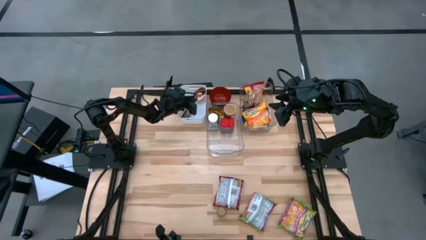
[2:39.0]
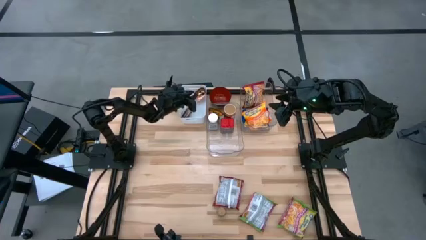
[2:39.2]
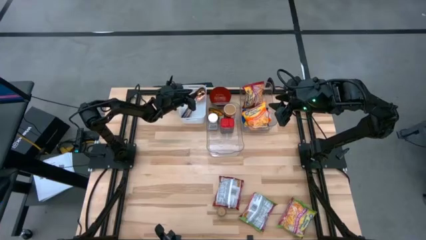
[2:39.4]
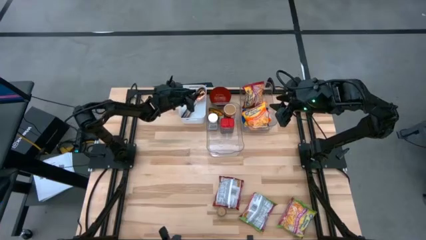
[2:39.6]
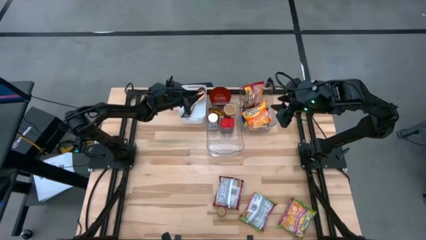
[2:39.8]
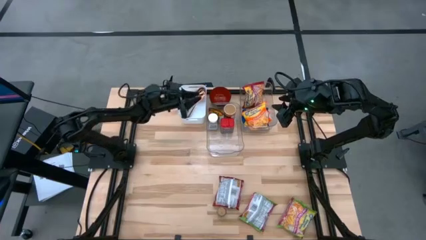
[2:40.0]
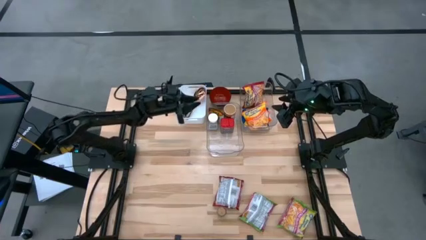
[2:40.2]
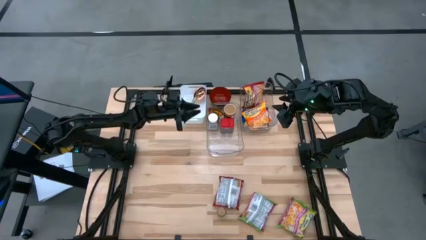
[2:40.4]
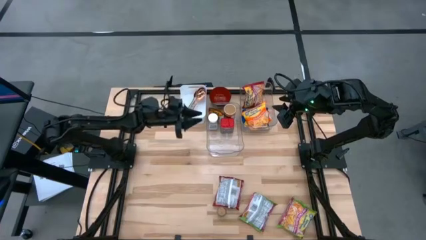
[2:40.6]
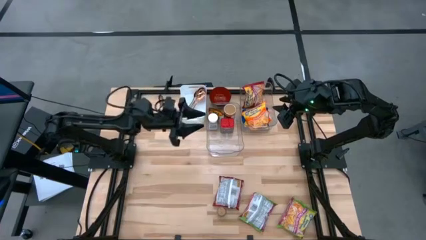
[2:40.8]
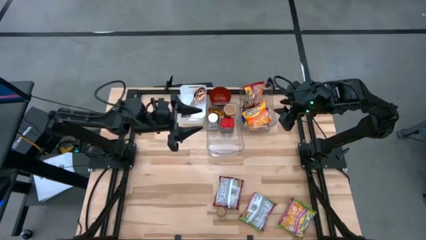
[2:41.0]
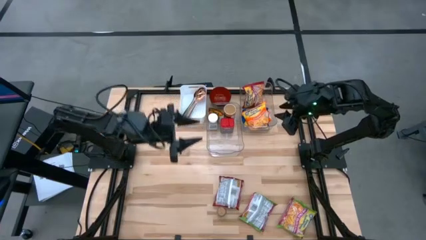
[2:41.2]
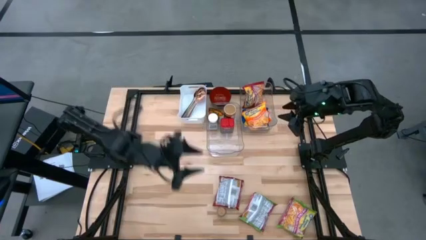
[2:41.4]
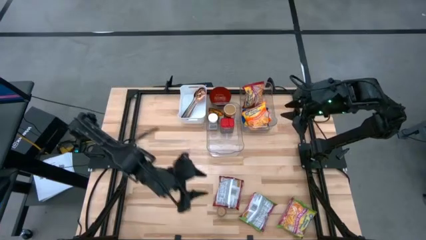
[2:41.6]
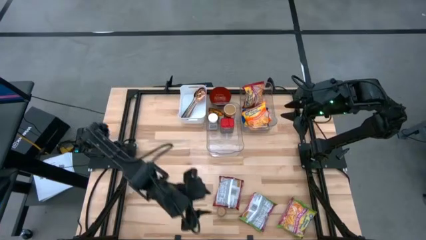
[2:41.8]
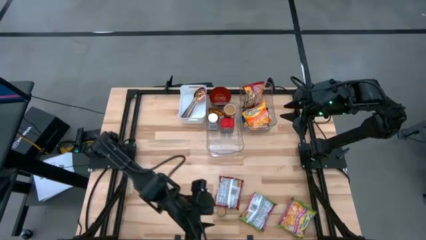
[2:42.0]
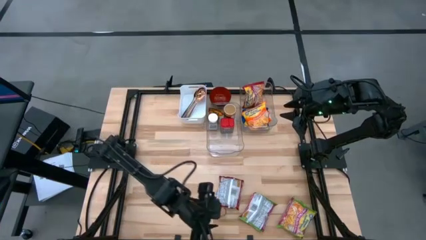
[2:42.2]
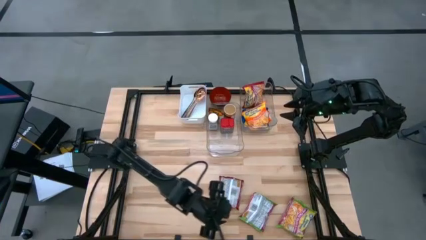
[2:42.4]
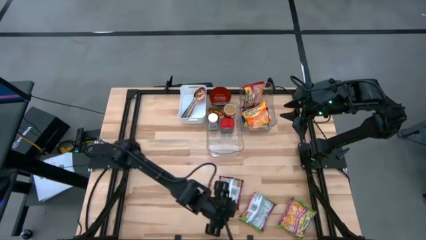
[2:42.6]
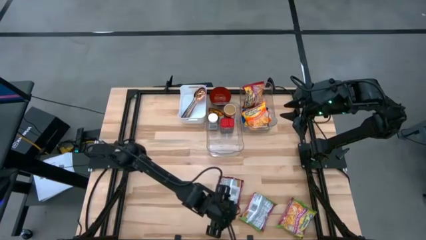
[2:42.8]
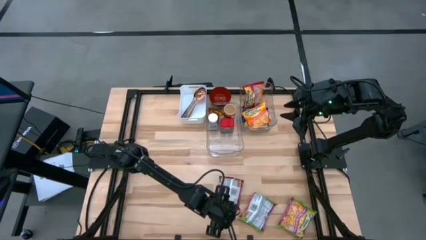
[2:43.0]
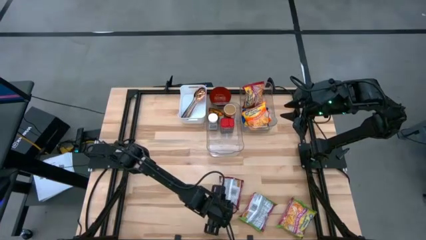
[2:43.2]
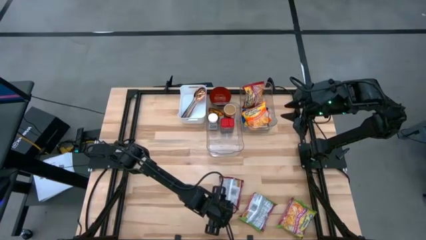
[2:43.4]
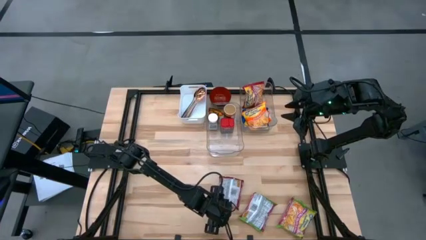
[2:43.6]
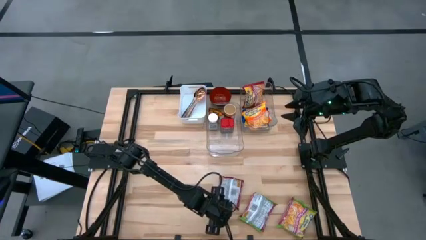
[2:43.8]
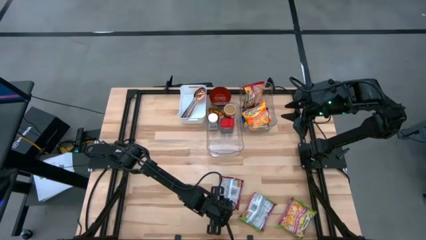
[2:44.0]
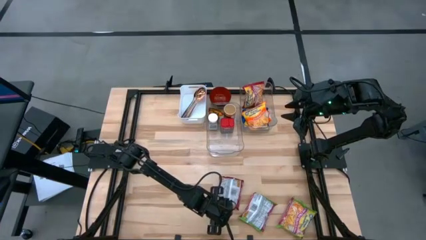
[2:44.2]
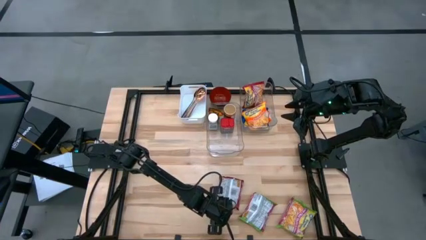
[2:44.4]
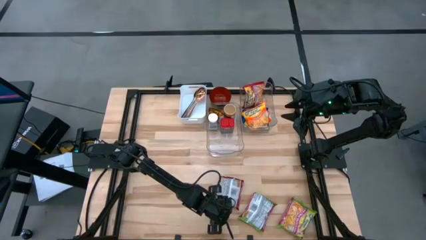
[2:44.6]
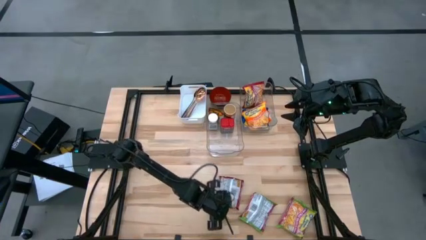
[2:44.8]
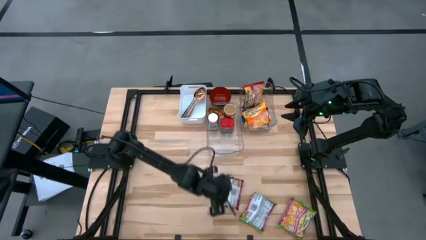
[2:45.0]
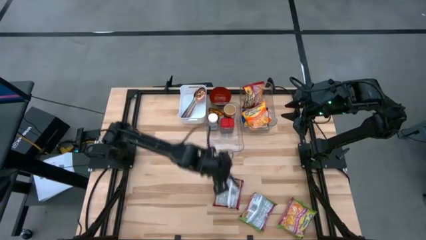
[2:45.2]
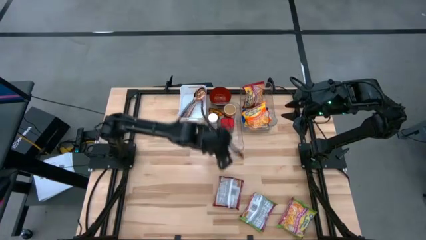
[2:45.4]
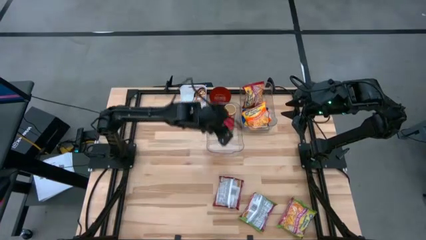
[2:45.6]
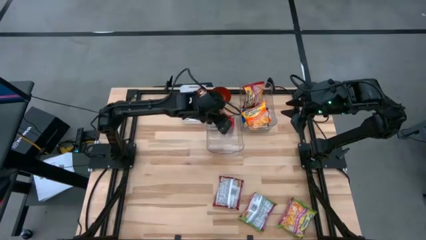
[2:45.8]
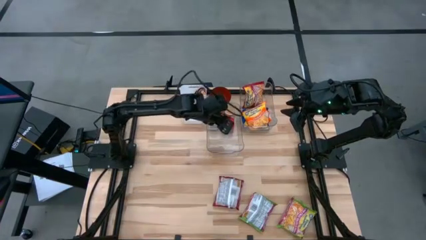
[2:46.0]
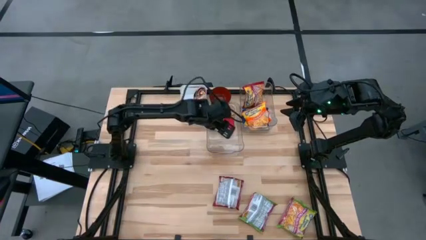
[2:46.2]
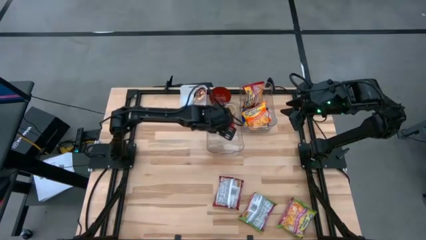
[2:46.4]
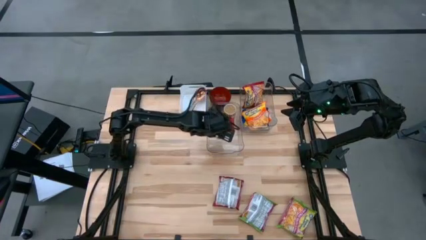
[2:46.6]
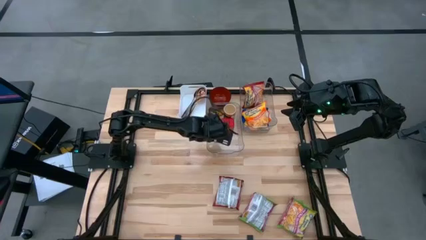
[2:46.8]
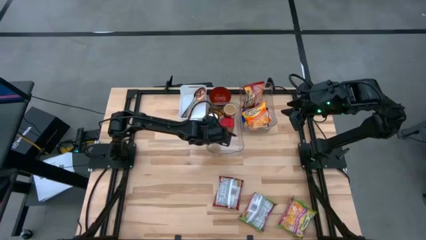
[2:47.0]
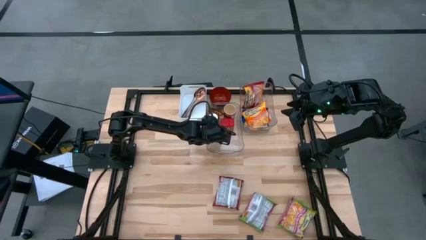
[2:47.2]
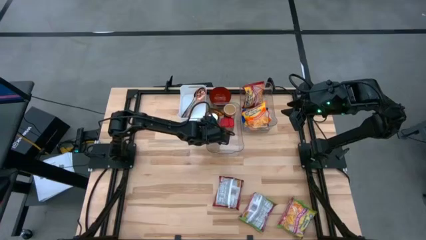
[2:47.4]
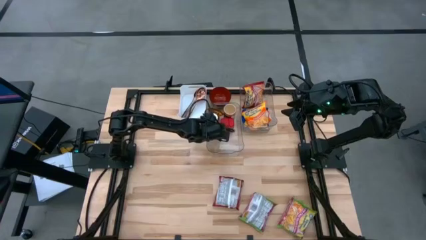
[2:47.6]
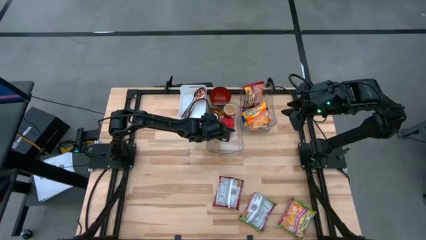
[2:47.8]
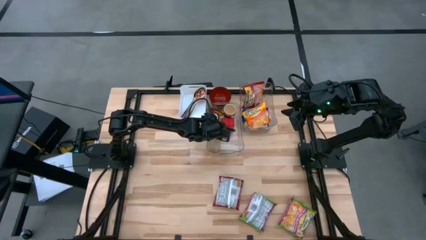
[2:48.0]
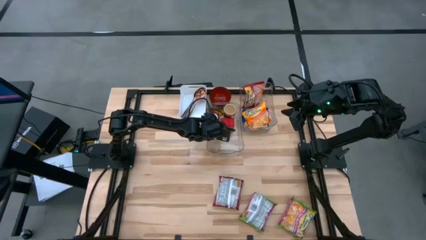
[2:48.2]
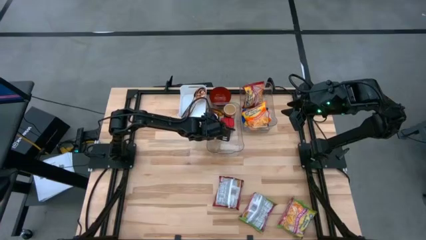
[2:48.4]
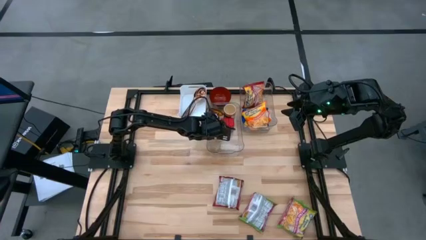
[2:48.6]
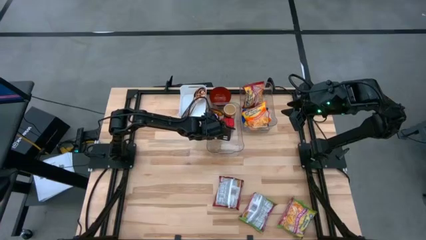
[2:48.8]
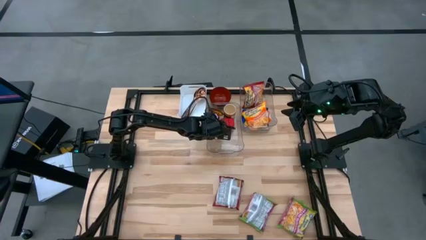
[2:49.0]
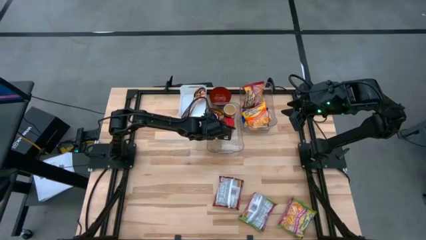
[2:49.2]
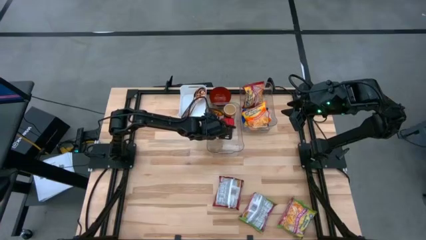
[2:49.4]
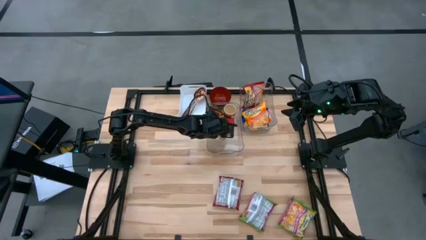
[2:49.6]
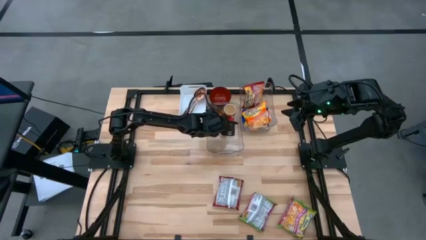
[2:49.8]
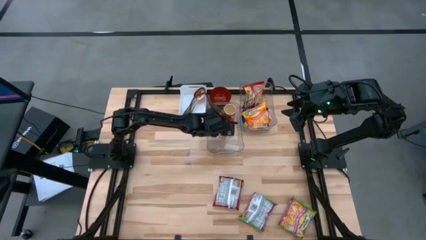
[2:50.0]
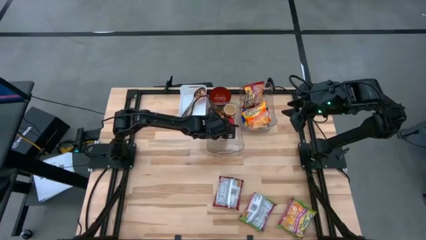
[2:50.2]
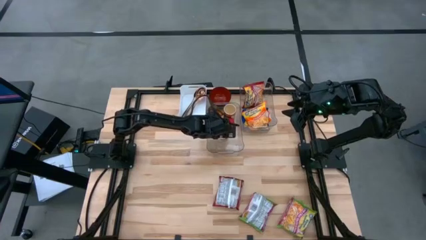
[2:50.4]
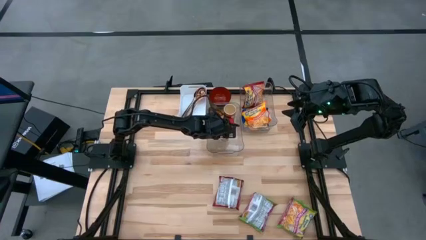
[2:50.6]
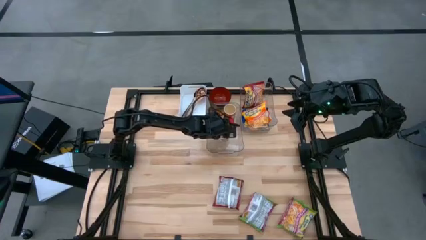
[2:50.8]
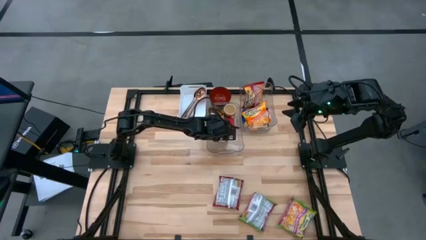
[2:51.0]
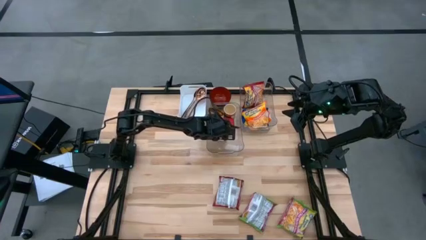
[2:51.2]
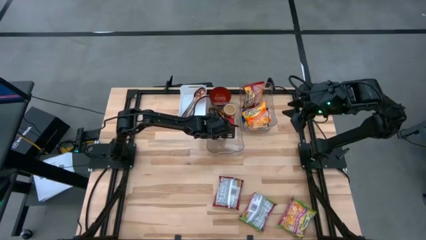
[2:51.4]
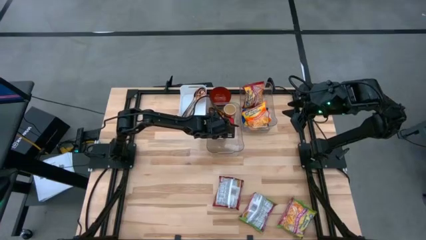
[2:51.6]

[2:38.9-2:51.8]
Task: Pick & Place Food Item
Put the brown spice bottle into the left transparent bin
